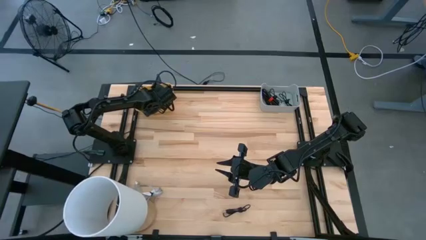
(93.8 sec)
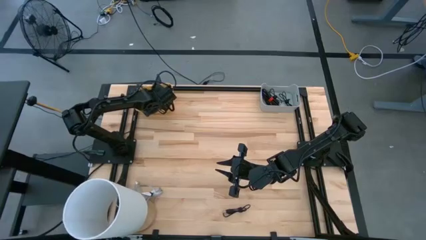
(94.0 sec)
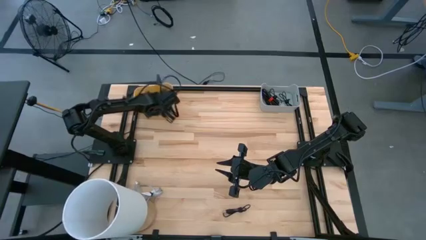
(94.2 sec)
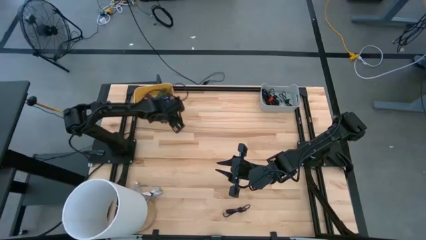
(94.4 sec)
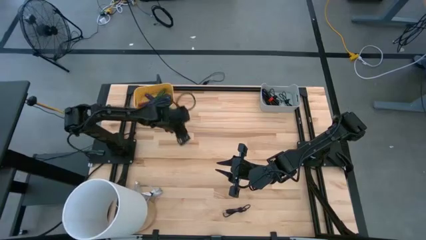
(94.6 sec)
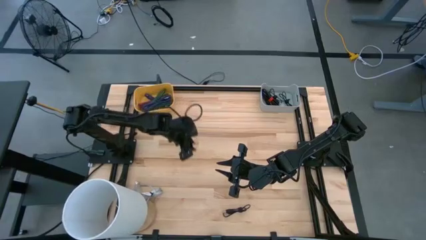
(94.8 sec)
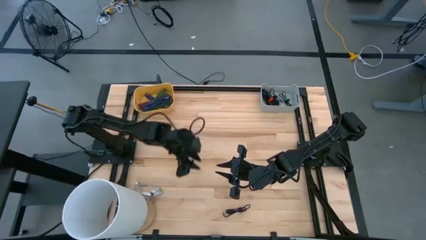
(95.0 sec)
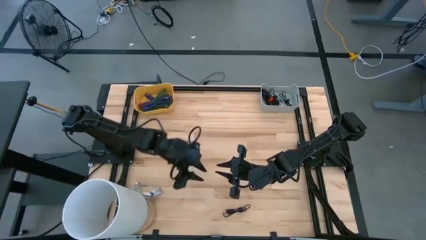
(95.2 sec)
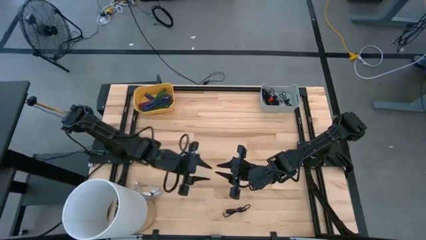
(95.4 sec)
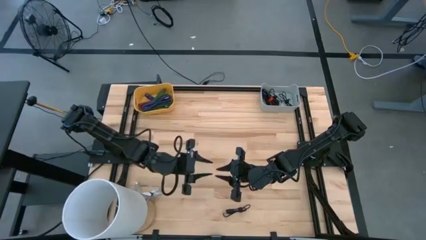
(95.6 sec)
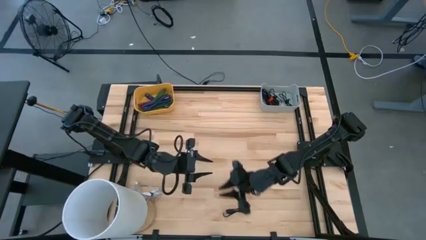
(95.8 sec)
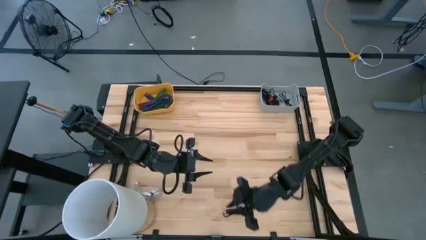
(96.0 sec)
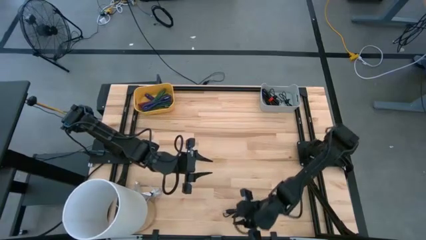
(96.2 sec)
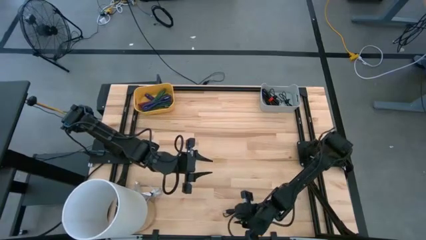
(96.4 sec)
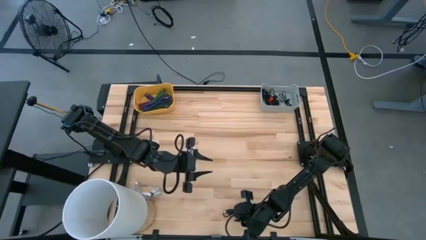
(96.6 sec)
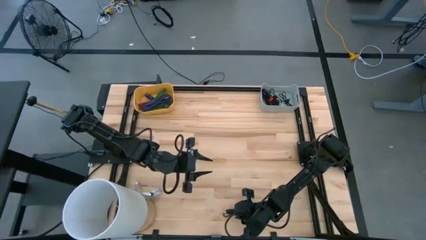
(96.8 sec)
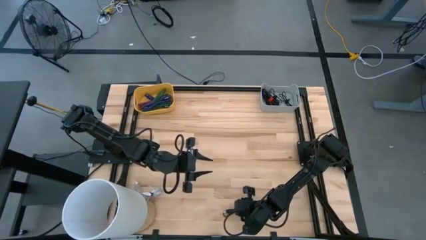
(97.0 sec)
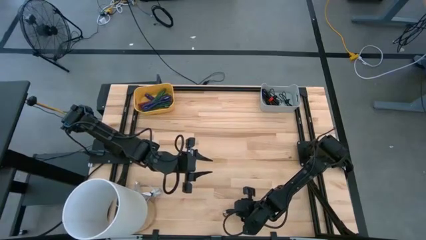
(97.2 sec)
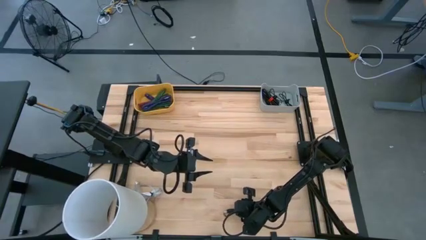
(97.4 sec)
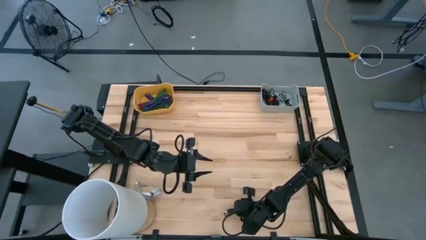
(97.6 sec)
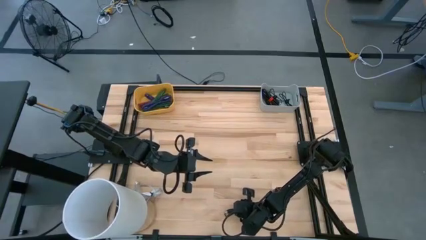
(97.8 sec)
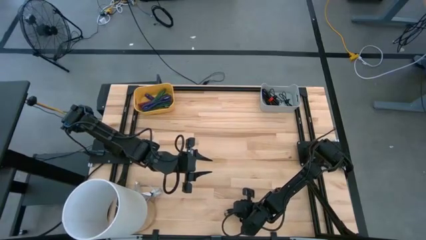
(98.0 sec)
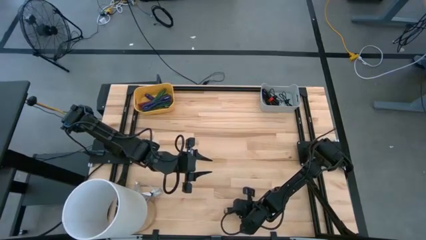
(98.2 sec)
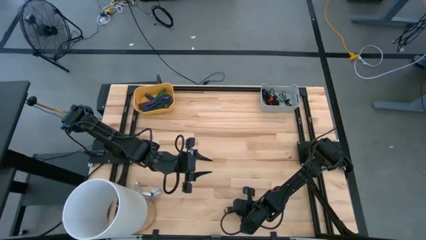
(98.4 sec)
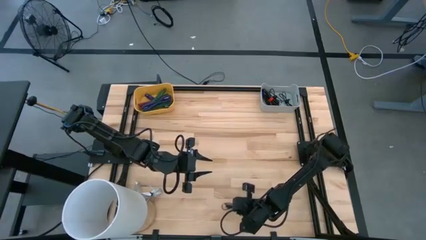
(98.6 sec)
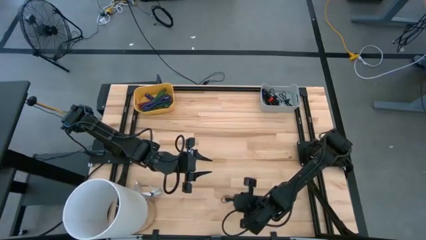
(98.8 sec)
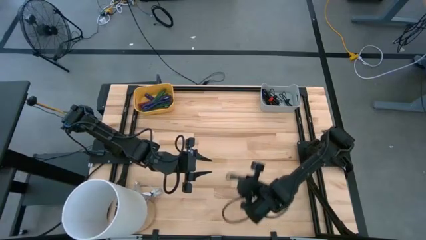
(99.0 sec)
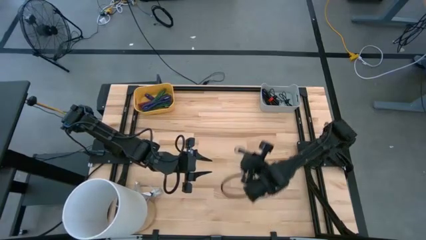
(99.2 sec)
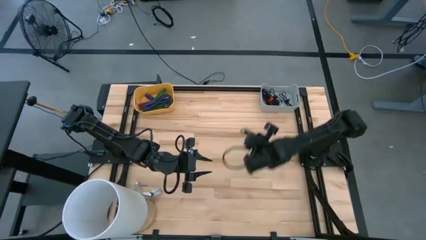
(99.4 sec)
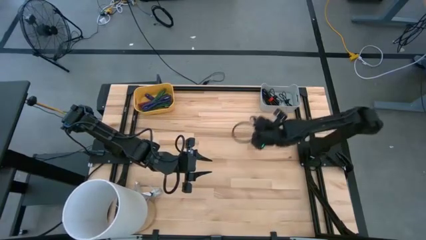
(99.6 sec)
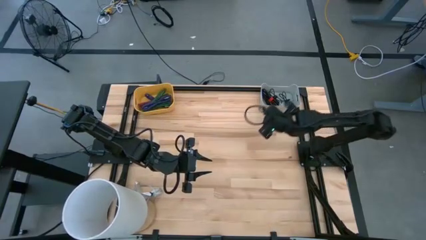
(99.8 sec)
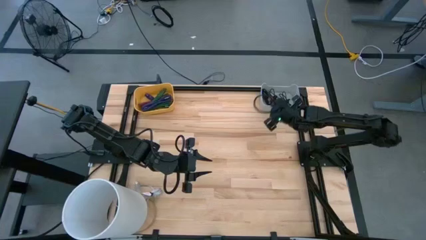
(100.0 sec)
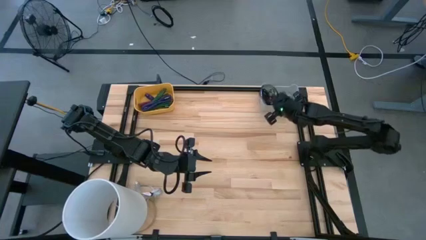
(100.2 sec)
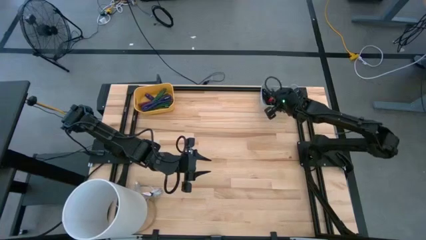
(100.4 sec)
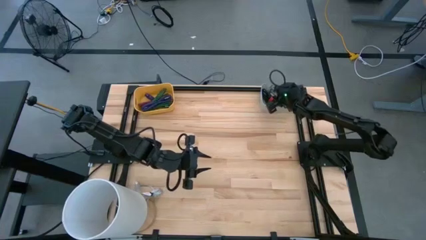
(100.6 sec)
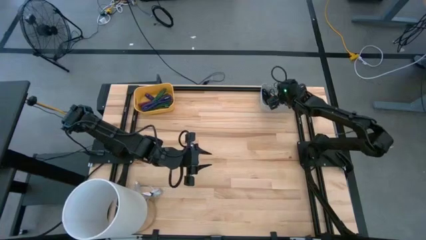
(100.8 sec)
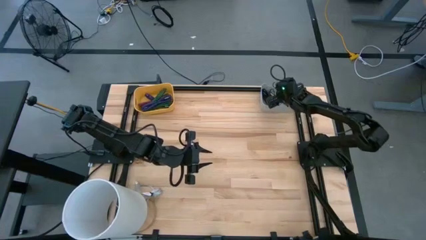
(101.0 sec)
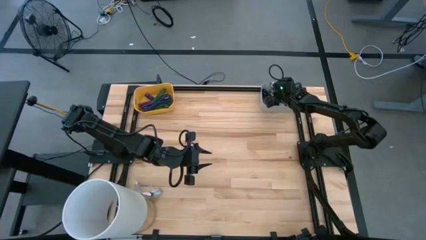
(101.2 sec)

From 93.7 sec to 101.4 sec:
Task: Pick & Place USB Port
Put the black charger cable into the gray bin

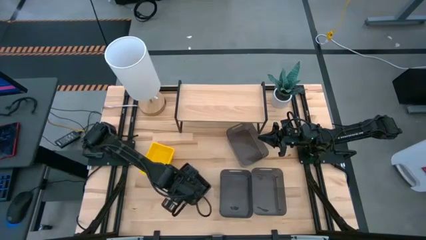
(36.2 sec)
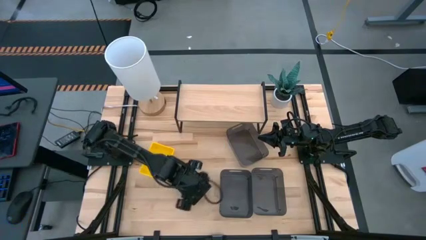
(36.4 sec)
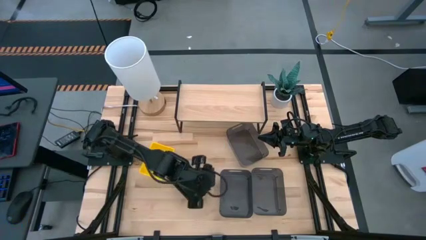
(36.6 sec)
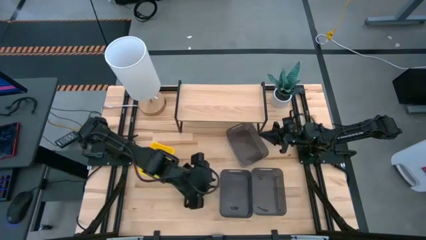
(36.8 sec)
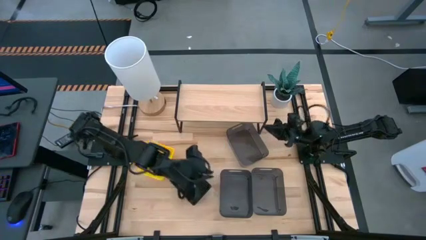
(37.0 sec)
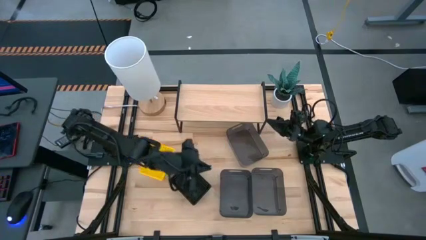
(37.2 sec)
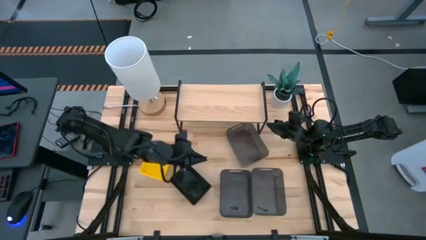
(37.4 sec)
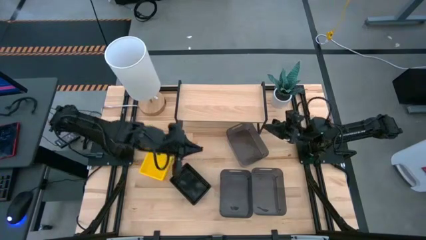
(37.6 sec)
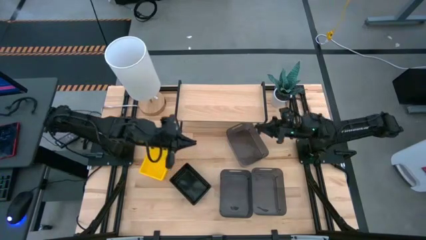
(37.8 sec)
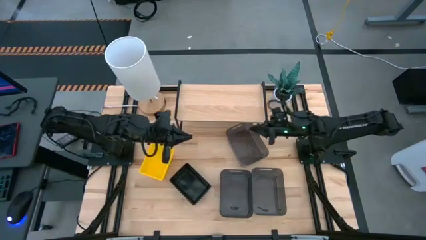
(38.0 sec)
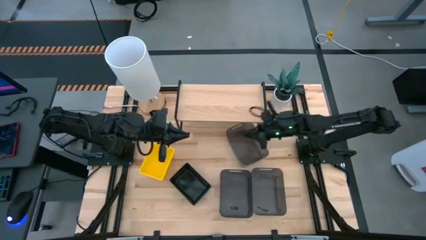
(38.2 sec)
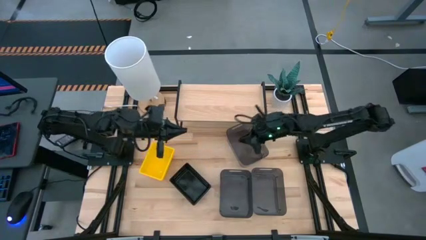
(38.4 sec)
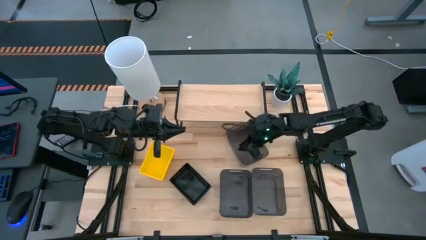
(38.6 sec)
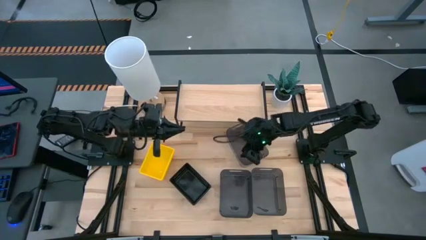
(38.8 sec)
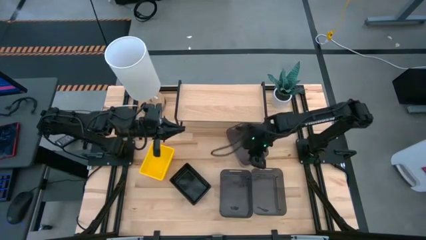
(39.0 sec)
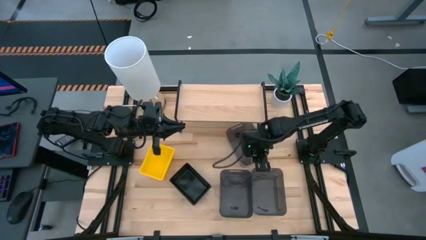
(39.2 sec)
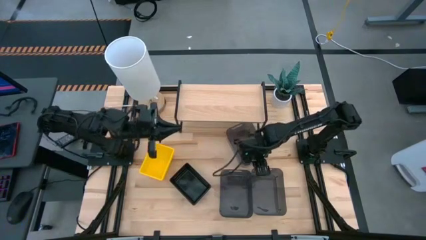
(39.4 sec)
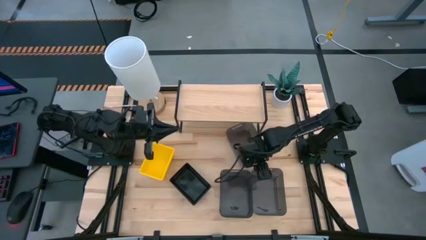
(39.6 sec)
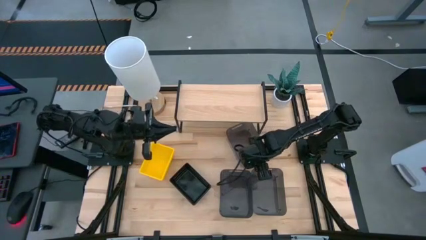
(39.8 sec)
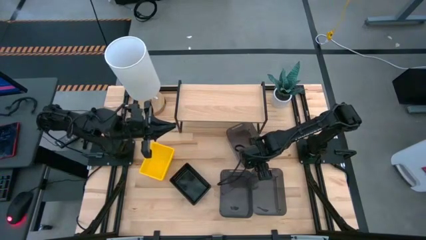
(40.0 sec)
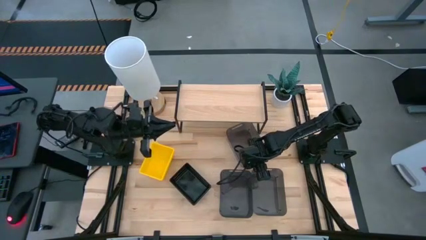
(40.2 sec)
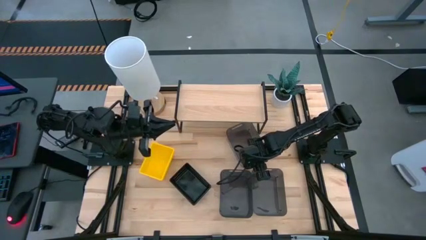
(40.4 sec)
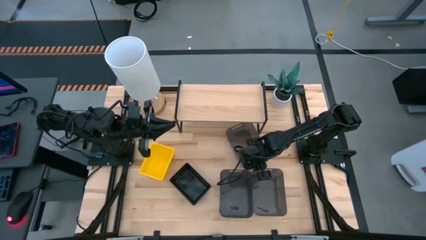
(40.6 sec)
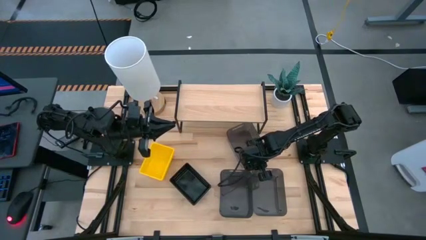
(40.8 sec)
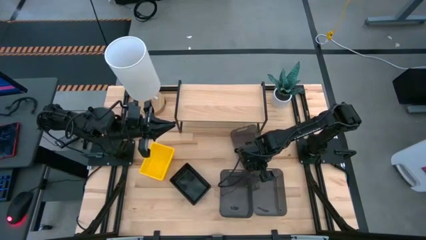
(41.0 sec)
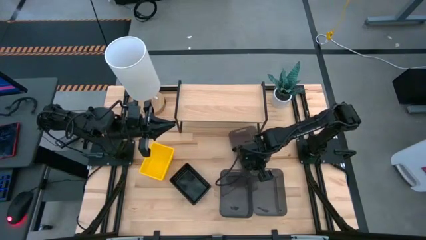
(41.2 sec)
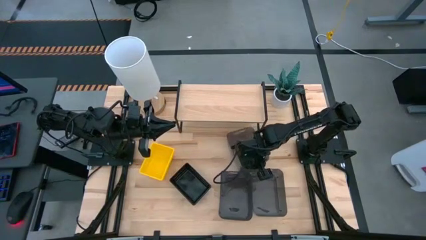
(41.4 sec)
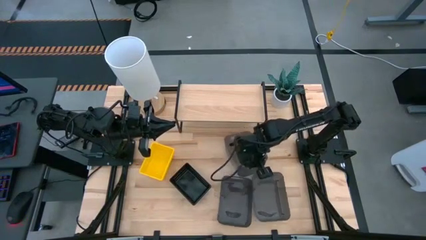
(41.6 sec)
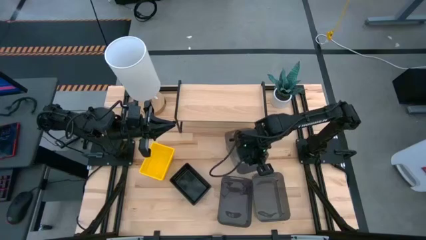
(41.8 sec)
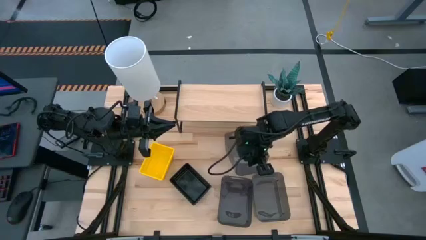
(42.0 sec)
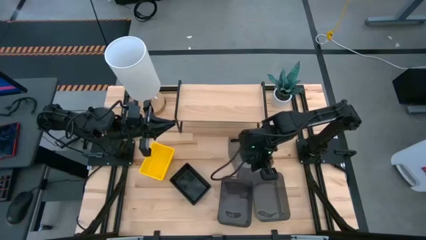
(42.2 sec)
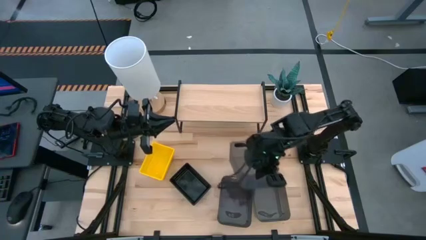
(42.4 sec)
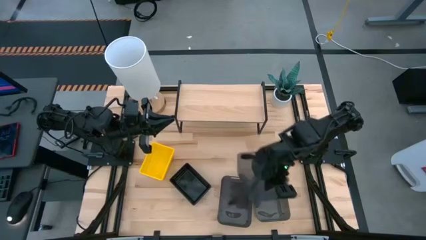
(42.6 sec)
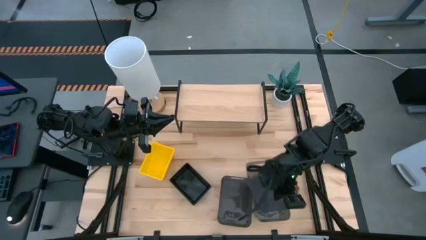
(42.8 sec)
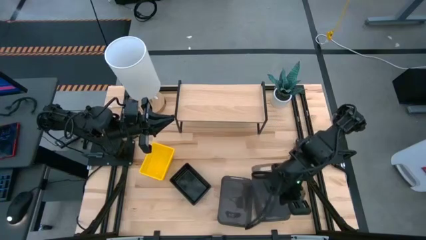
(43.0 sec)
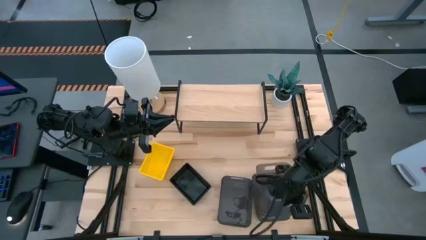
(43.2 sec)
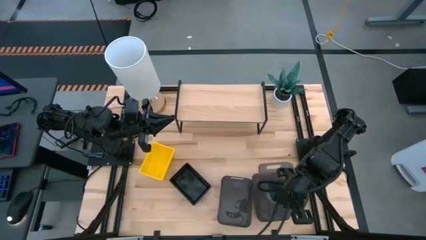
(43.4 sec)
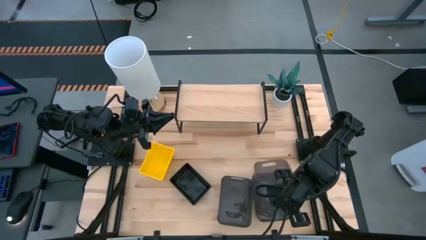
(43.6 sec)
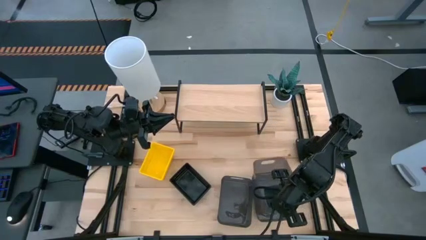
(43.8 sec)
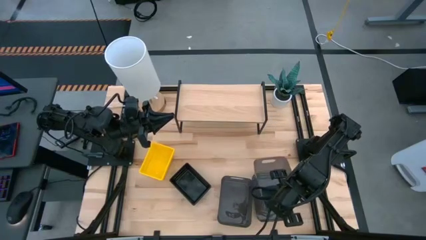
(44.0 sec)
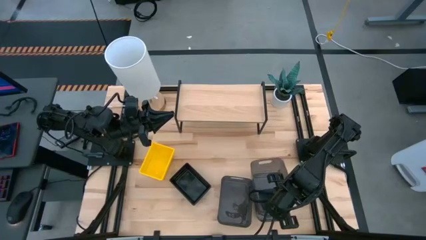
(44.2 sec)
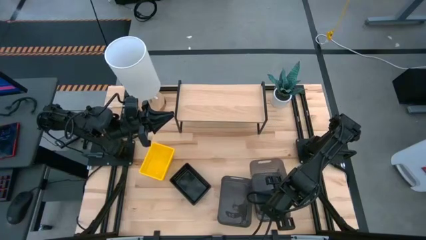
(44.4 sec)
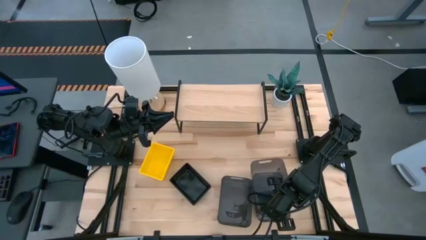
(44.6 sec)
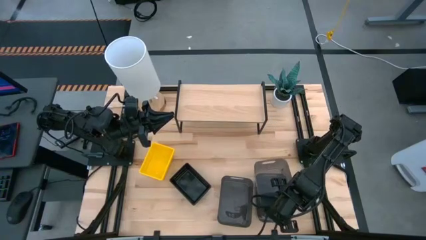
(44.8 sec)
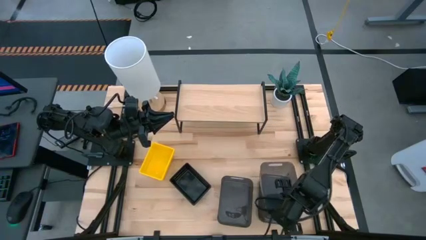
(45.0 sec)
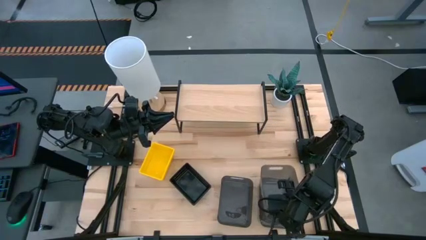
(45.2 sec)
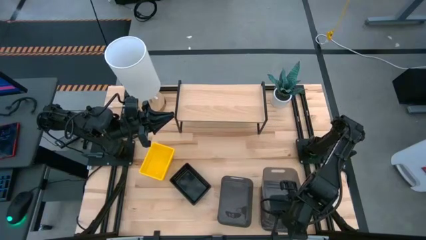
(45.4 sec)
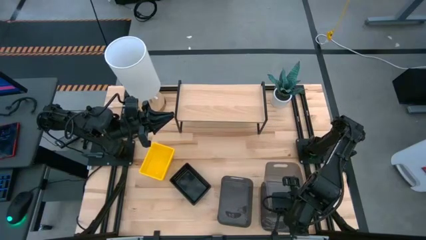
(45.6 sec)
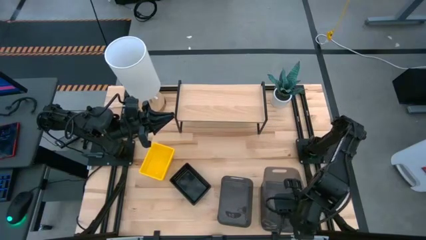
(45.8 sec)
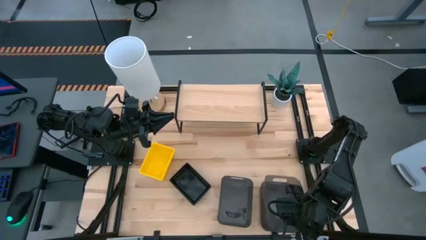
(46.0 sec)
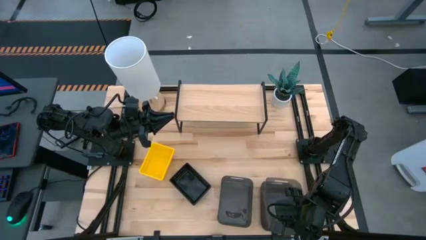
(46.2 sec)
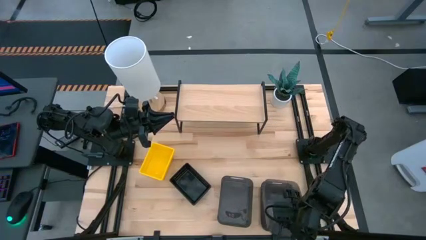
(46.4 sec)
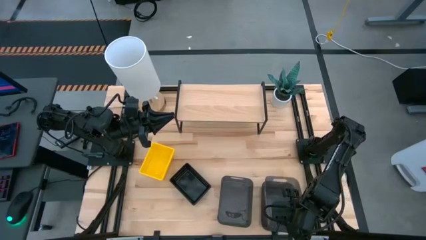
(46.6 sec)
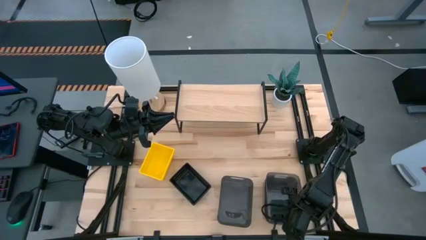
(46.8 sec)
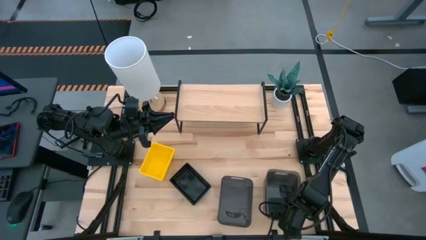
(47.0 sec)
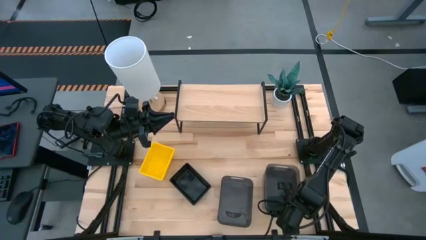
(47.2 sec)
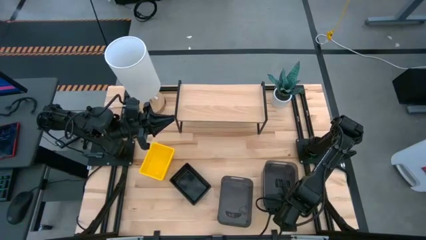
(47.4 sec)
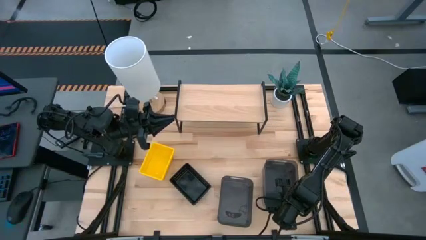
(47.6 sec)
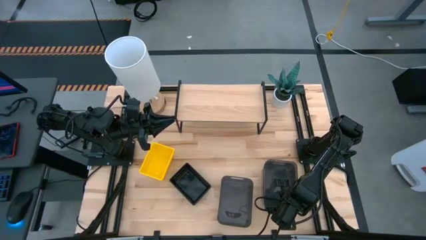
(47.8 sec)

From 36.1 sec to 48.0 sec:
Task: Stack baskets on shelf by color
Stack the top transparent black bin on the bottom right transparent black bin on the table
